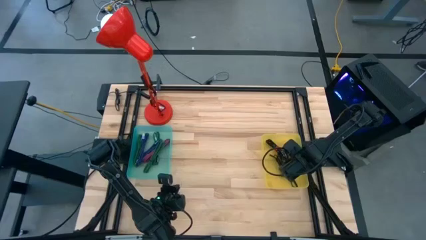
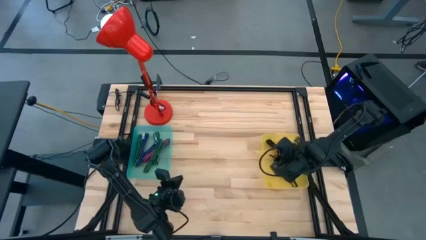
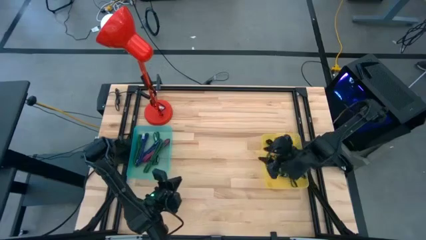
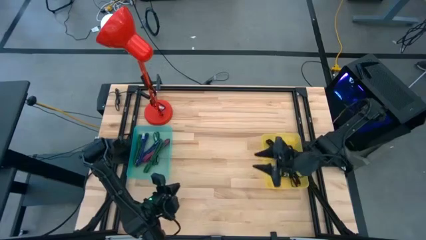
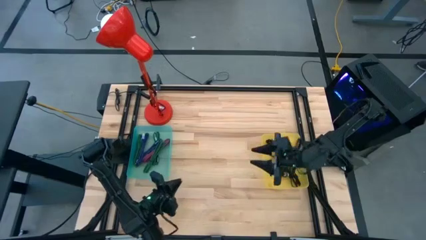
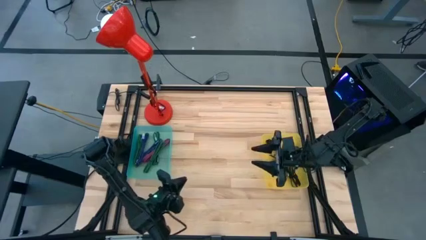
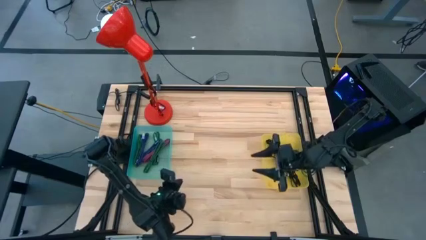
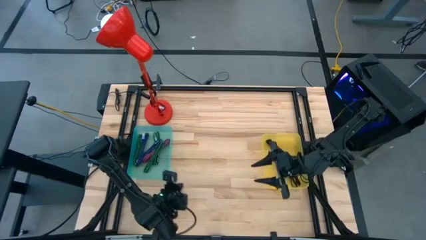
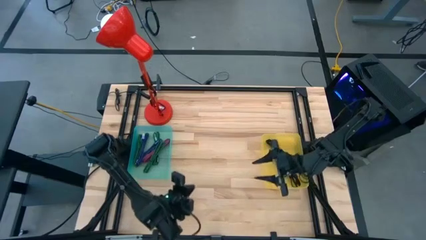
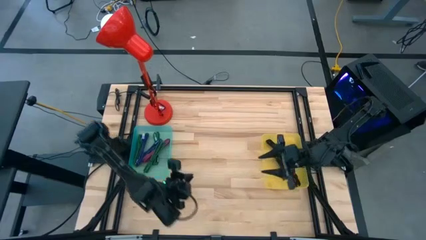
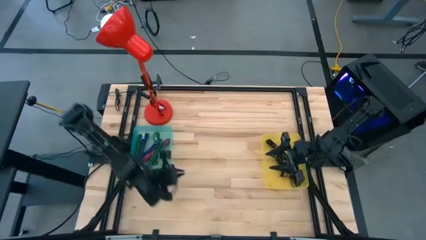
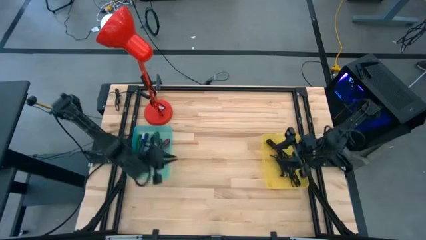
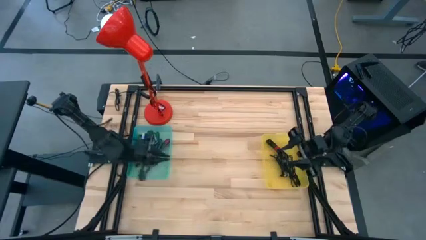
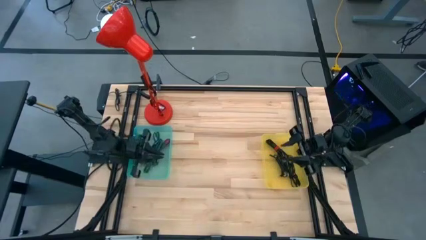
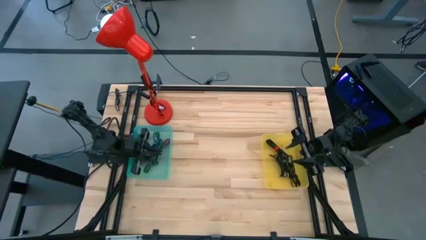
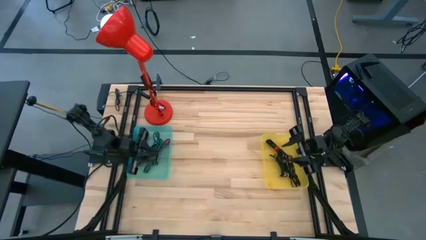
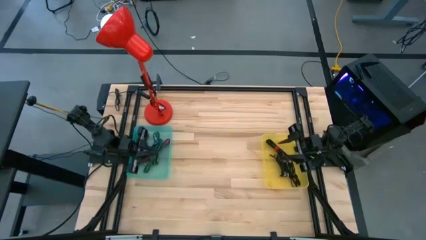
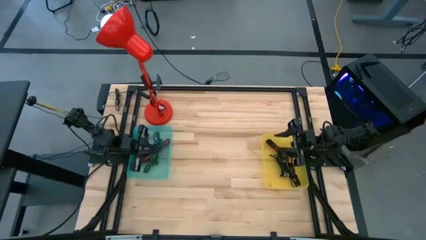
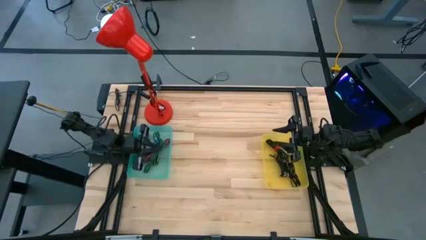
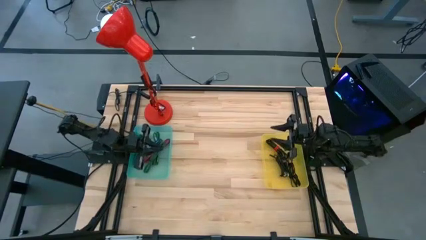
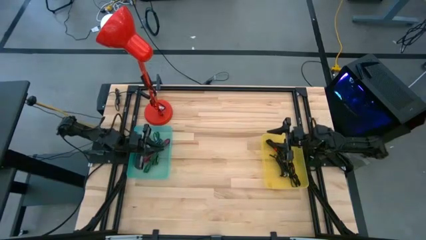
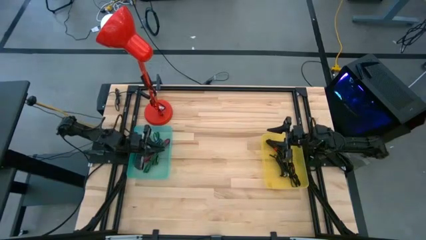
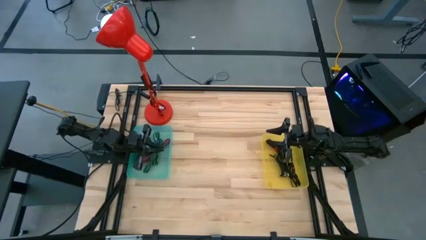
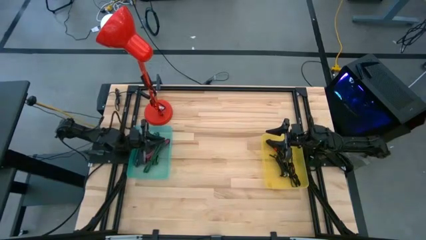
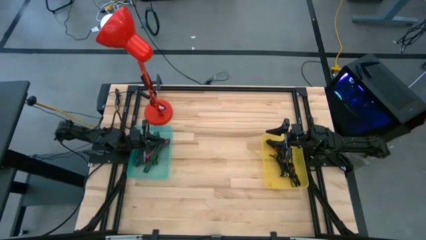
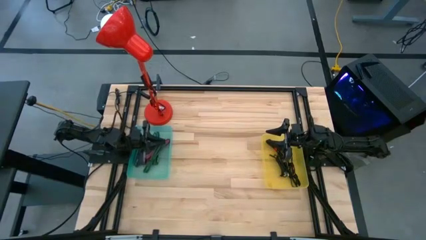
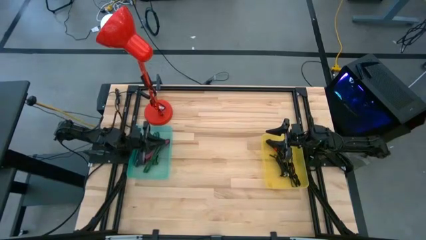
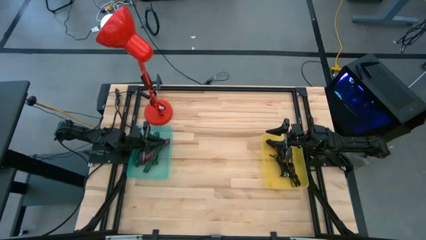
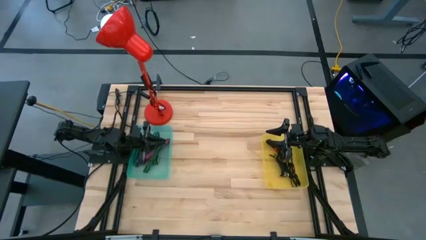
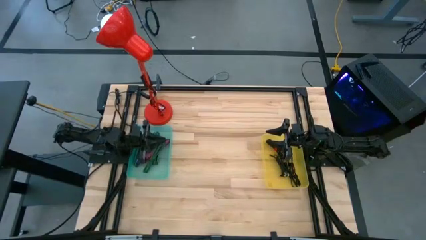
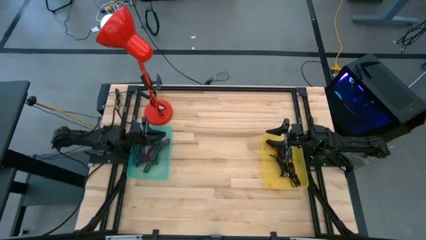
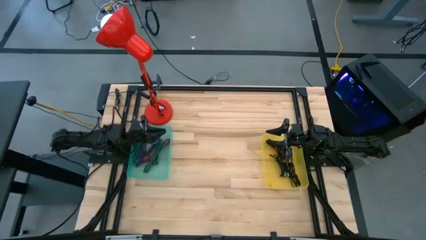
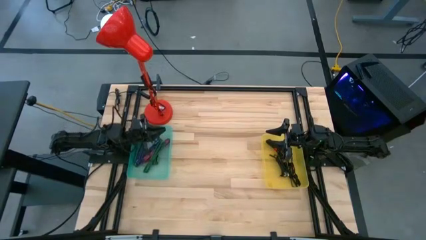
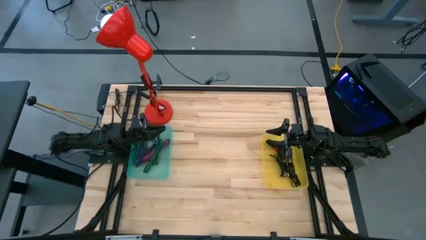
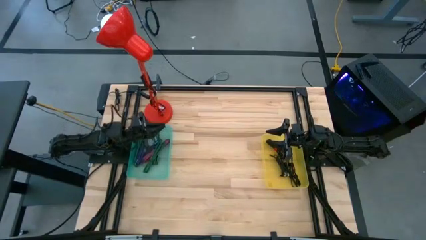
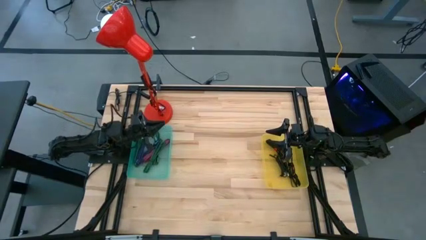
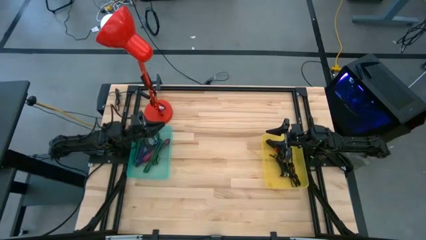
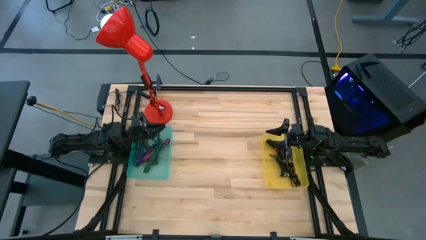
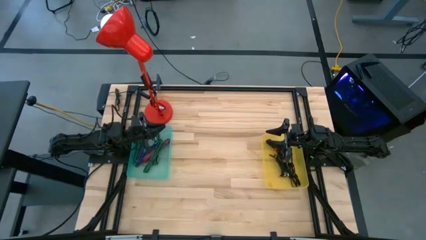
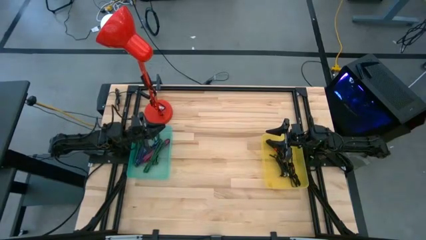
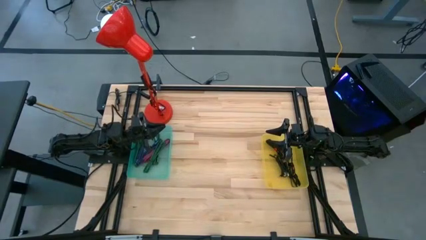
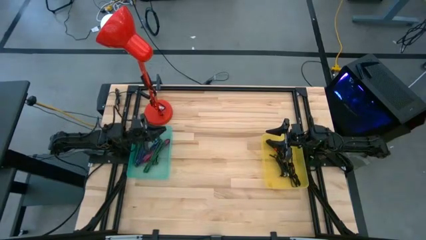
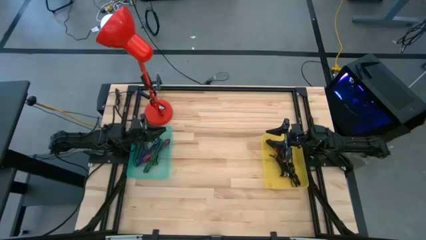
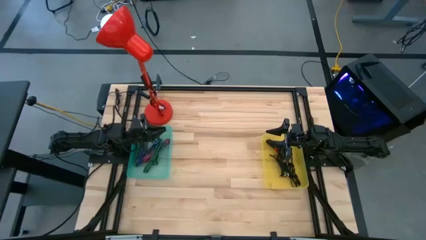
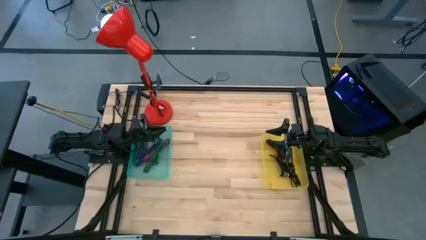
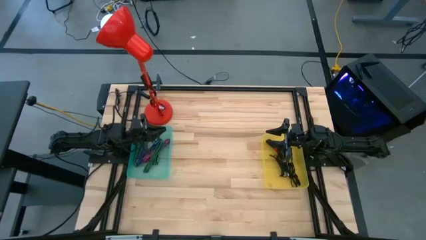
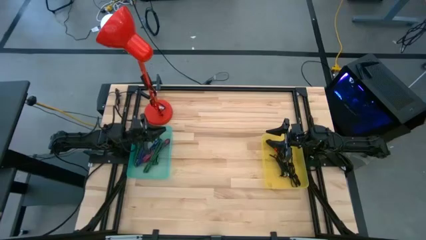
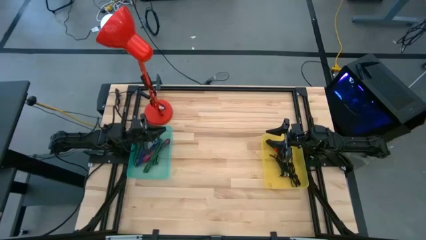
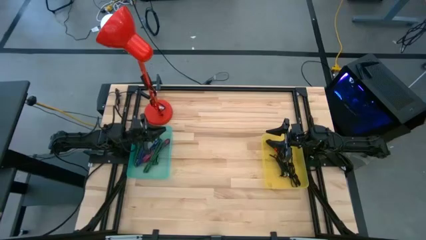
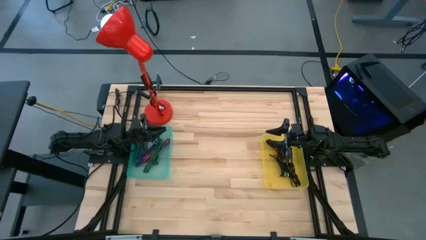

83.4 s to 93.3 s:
Task: Pick & Place USB Port
Return to Home Position

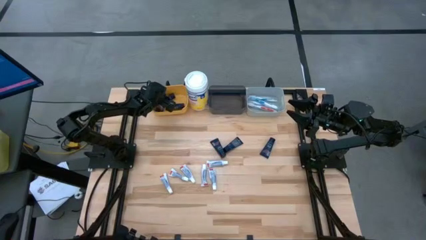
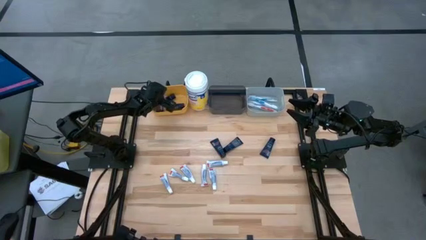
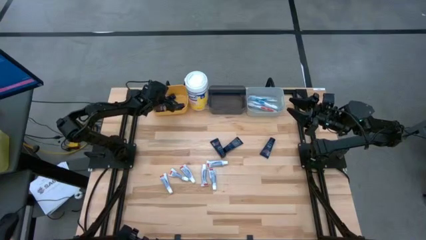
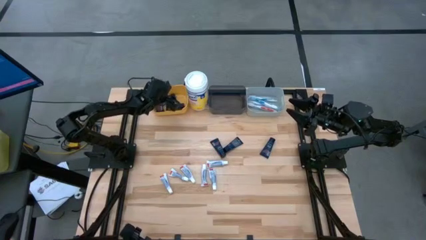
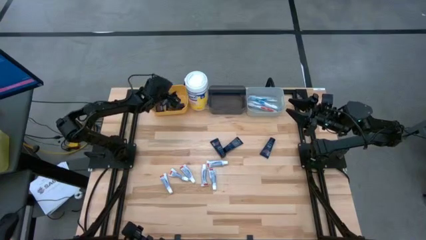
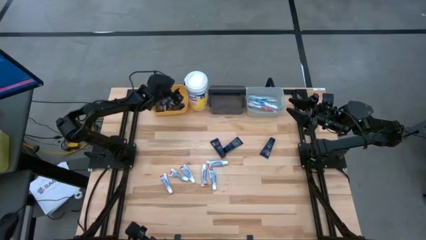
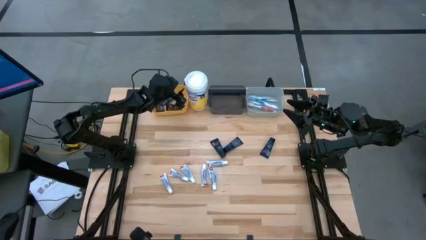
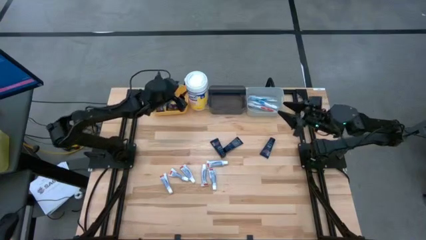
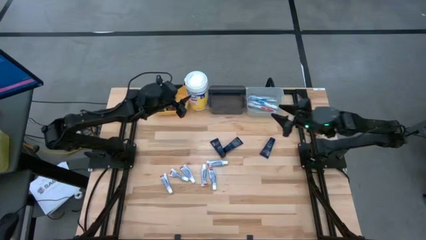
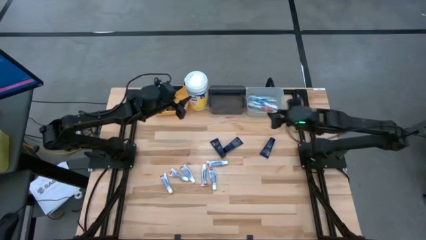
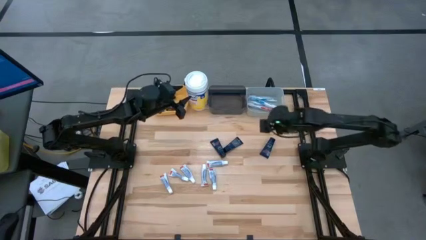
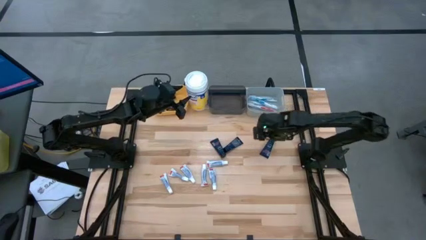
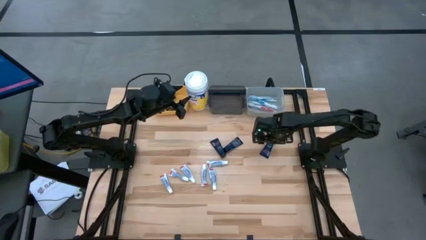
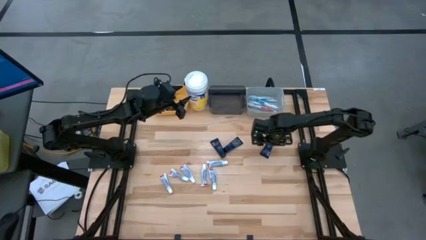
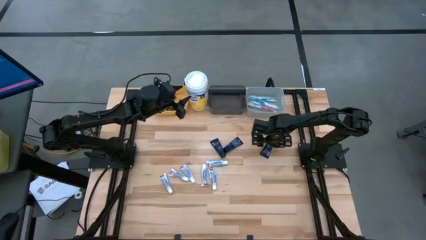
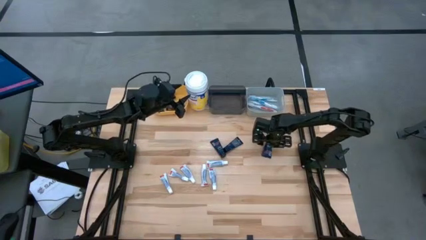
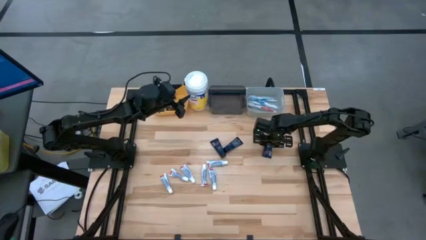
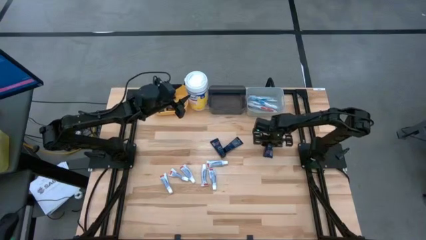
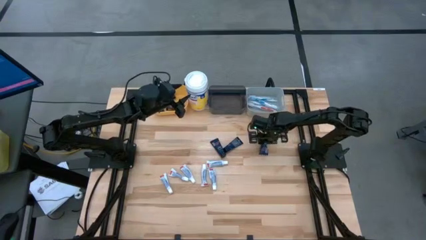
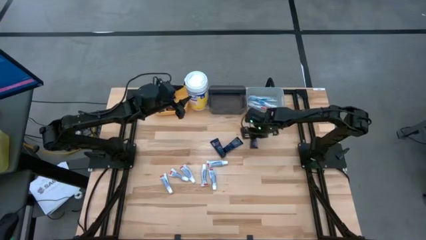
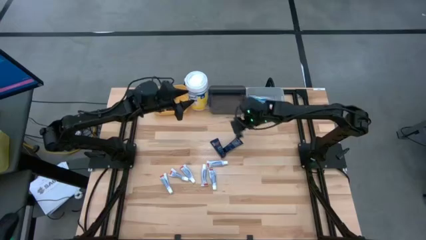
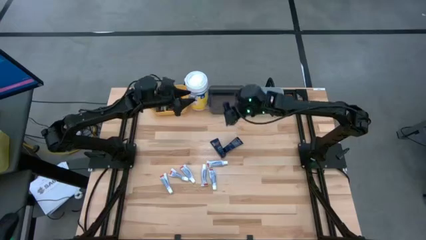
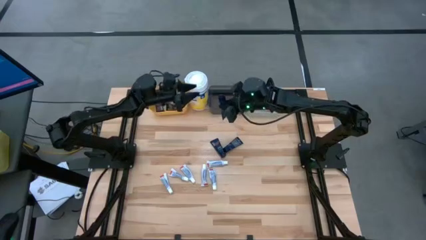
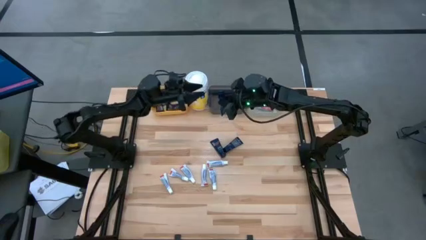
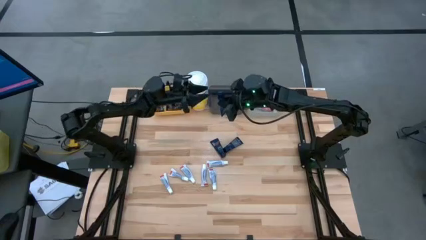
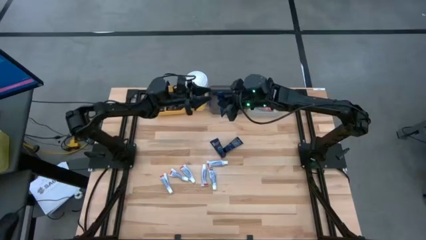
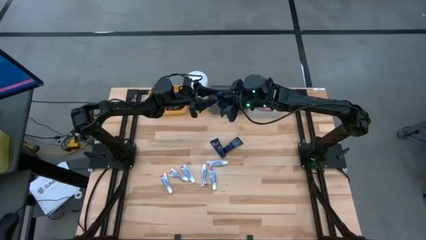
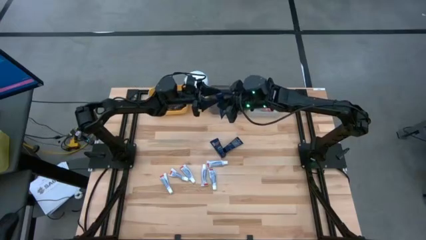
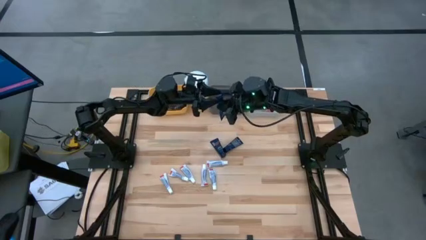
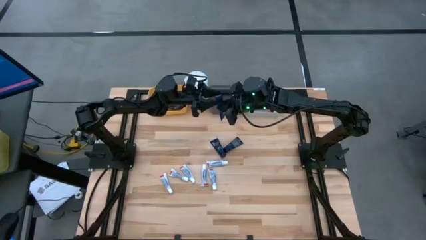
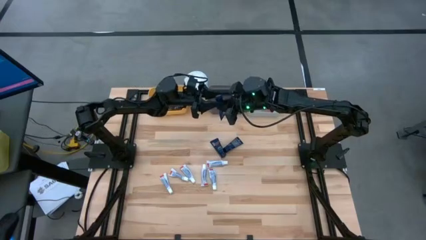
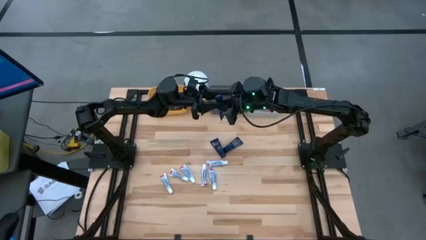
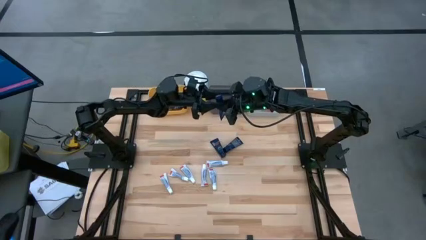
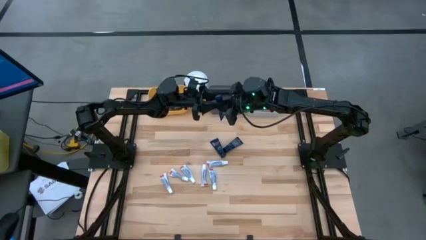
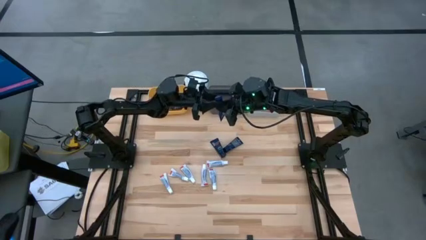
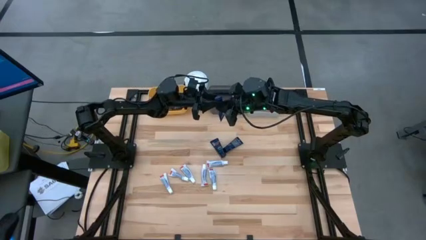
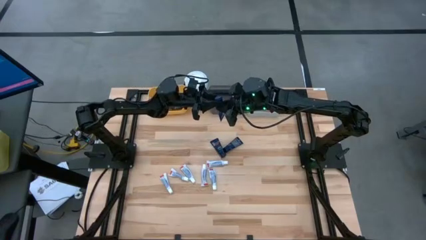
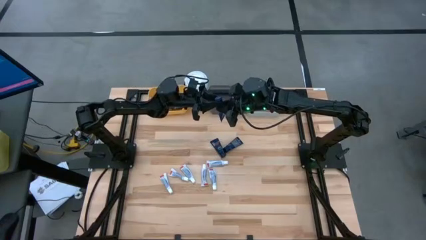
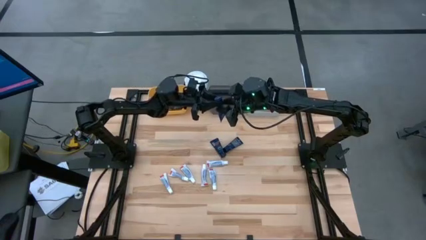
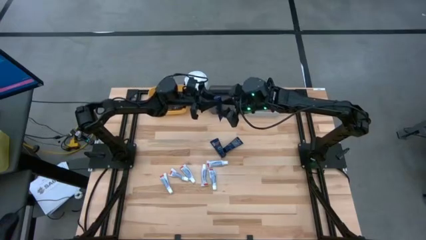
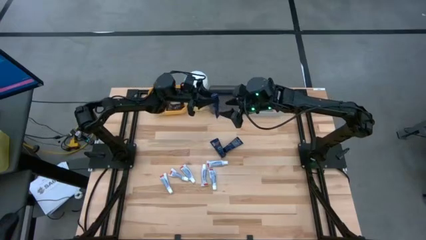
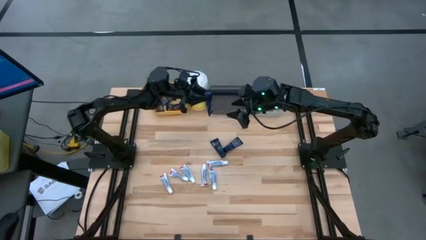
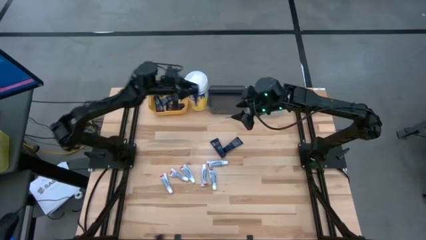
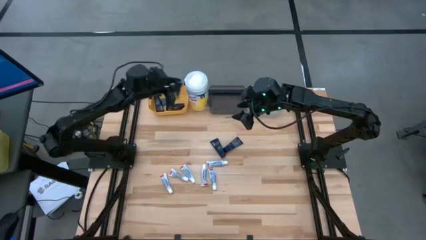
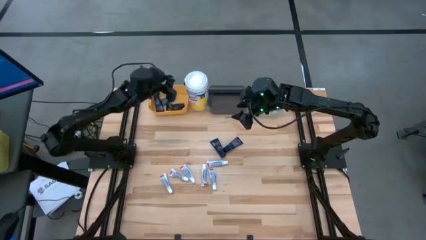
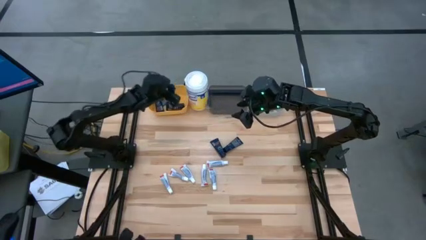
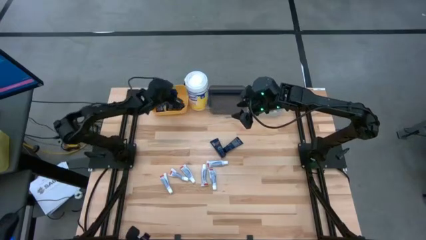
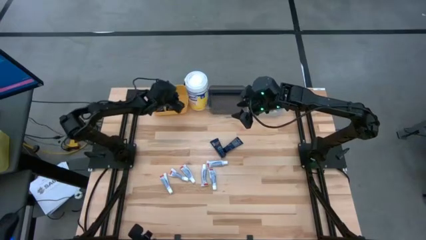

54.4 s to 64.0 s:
Task: Pick & Place Travel size toiletries
Put the blue shave cream into the yellow bin
